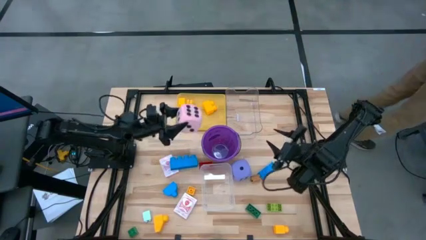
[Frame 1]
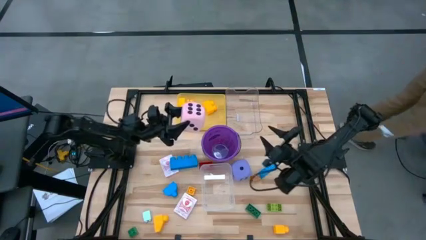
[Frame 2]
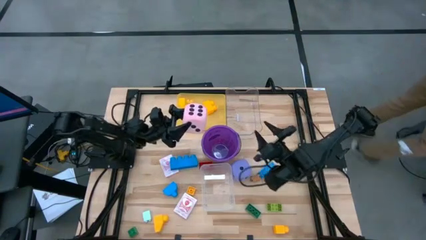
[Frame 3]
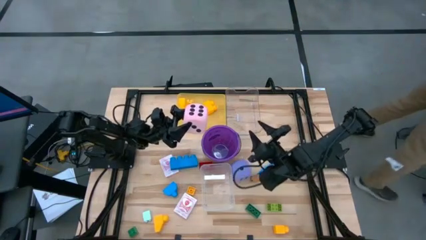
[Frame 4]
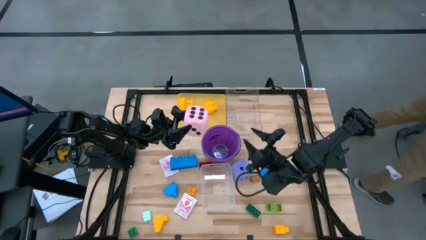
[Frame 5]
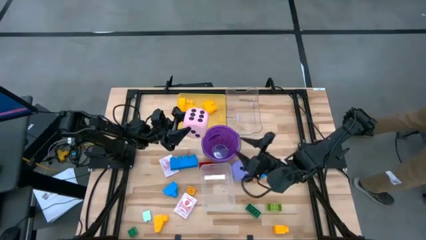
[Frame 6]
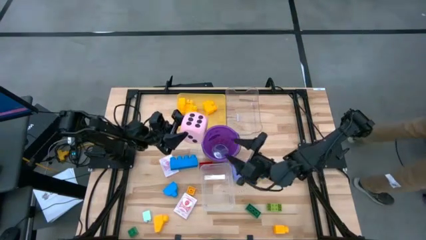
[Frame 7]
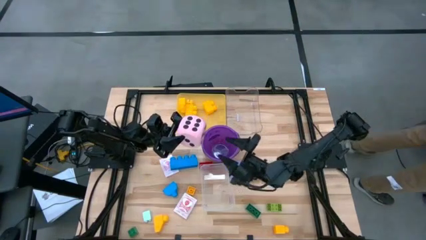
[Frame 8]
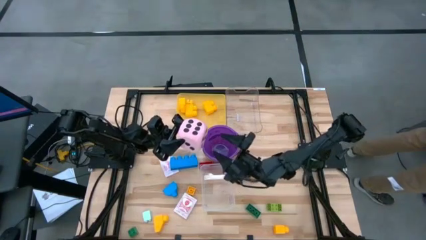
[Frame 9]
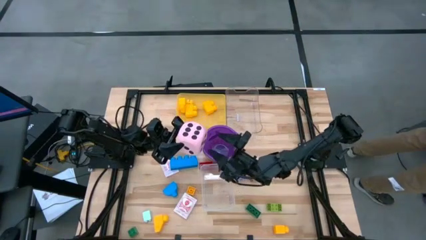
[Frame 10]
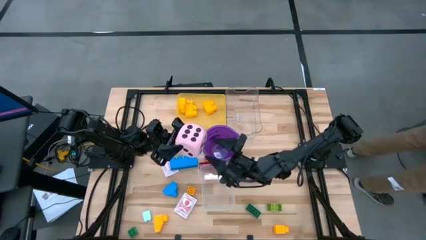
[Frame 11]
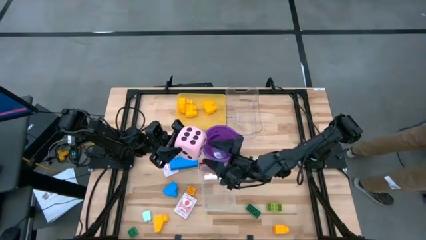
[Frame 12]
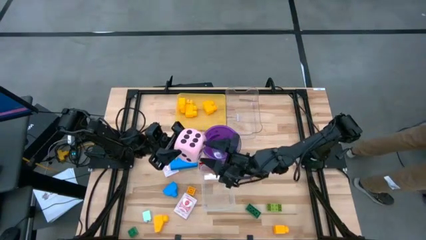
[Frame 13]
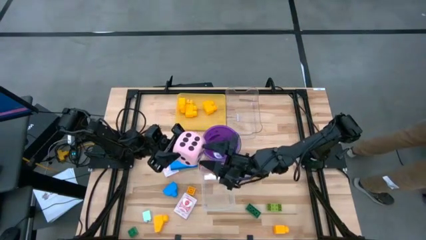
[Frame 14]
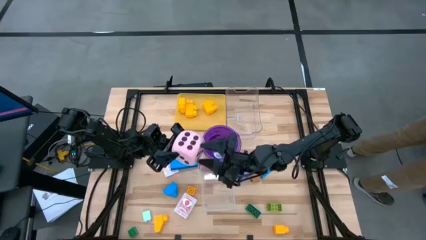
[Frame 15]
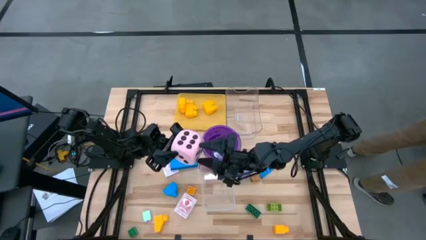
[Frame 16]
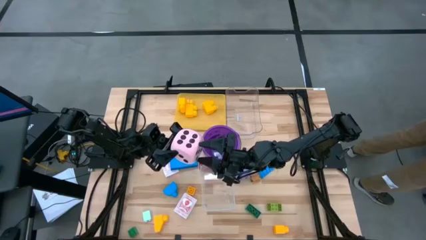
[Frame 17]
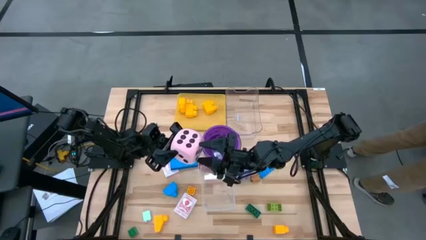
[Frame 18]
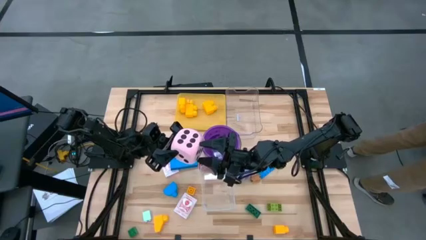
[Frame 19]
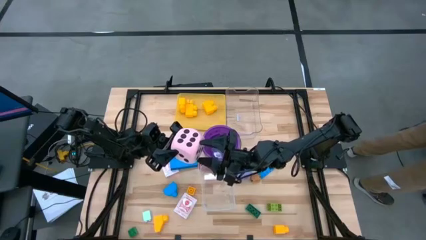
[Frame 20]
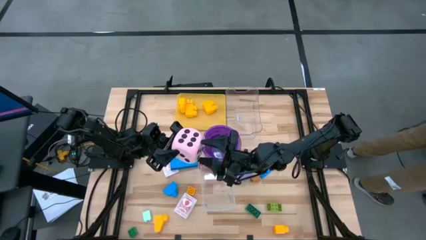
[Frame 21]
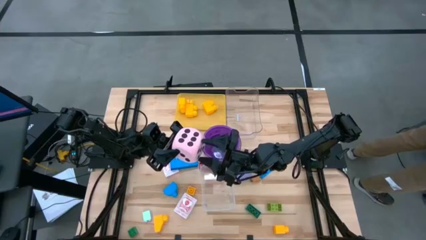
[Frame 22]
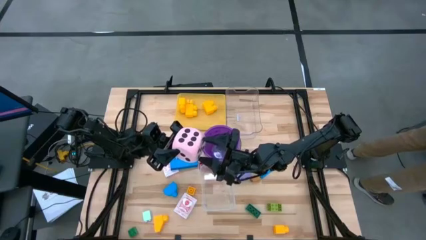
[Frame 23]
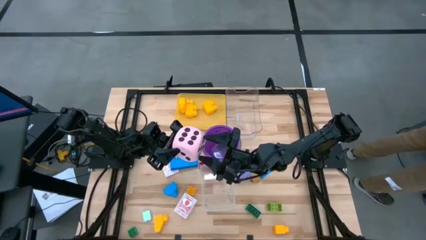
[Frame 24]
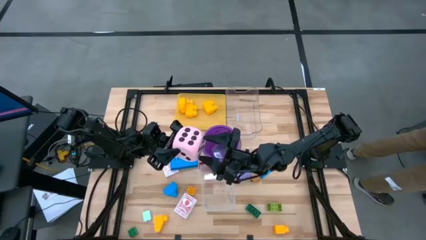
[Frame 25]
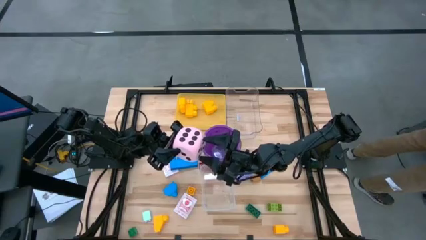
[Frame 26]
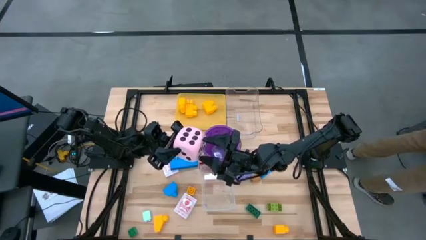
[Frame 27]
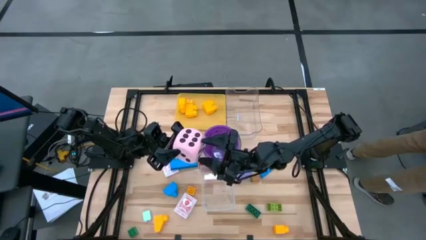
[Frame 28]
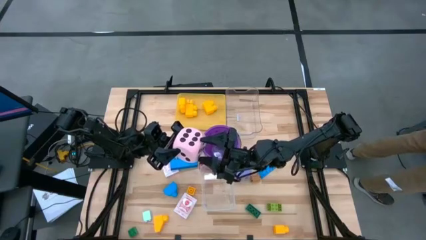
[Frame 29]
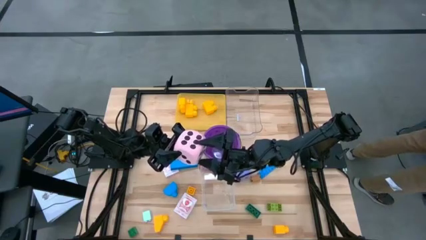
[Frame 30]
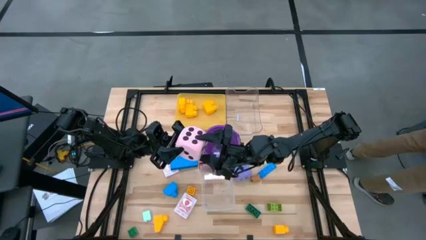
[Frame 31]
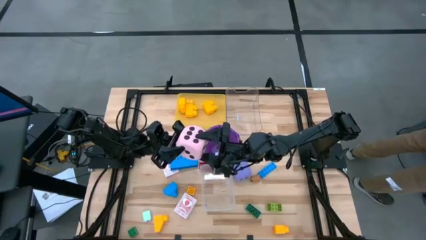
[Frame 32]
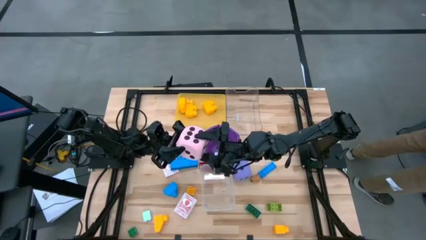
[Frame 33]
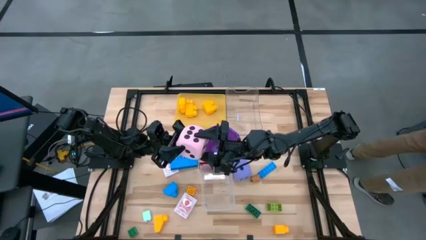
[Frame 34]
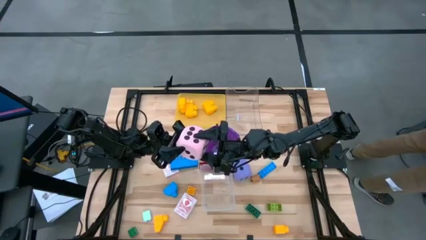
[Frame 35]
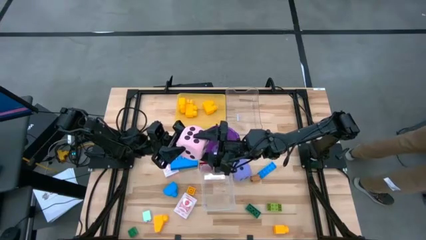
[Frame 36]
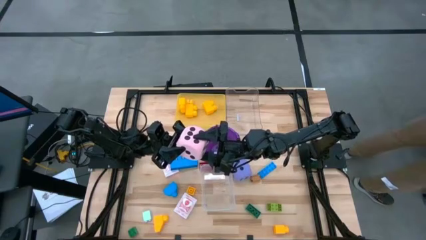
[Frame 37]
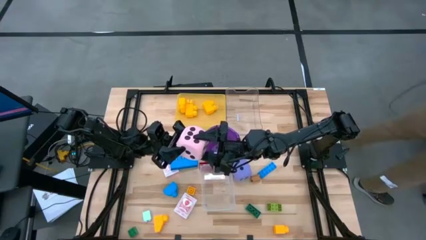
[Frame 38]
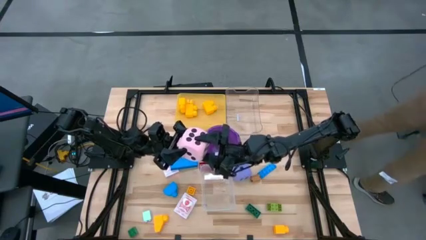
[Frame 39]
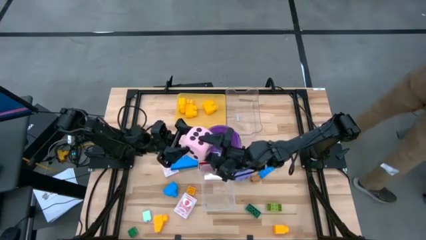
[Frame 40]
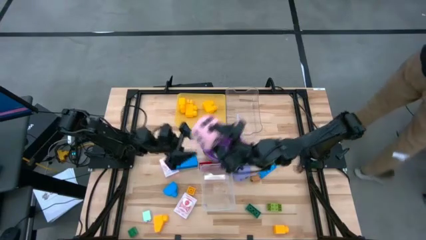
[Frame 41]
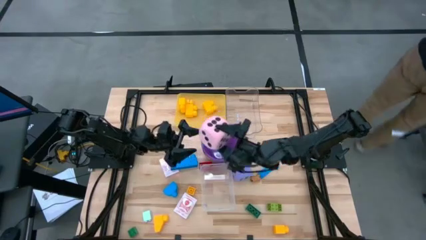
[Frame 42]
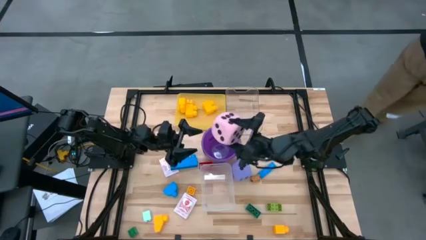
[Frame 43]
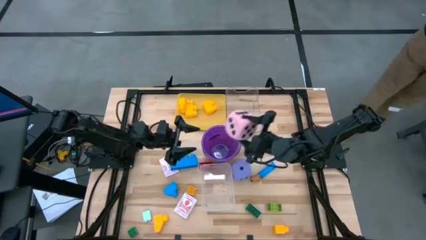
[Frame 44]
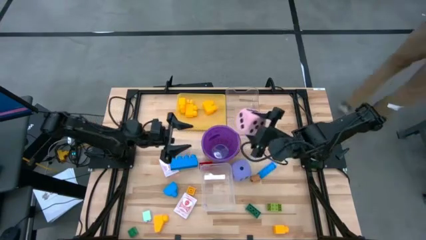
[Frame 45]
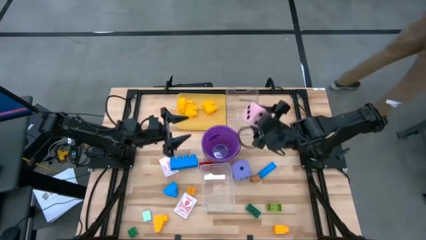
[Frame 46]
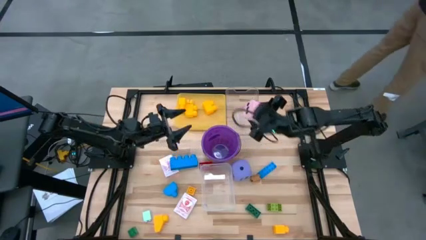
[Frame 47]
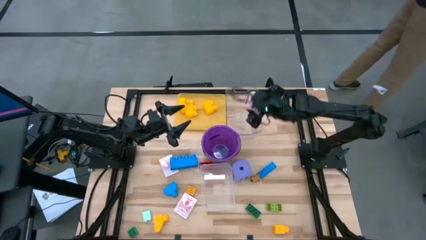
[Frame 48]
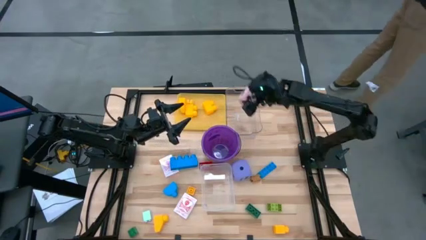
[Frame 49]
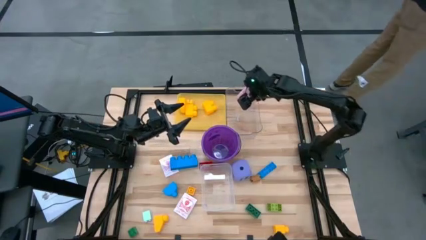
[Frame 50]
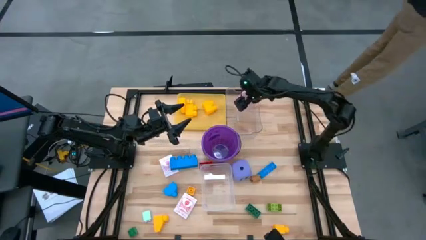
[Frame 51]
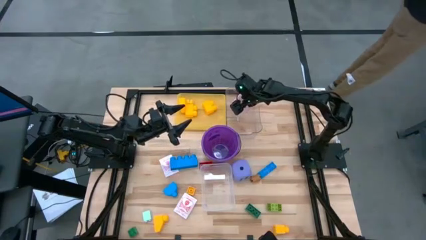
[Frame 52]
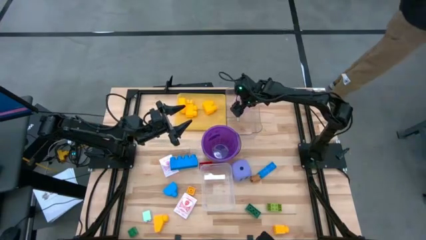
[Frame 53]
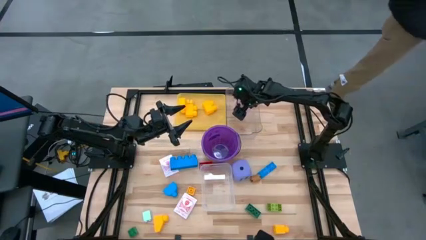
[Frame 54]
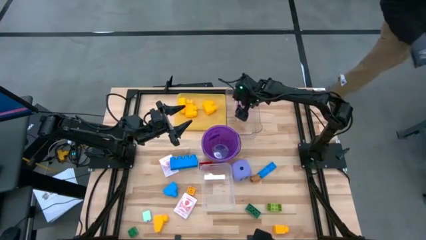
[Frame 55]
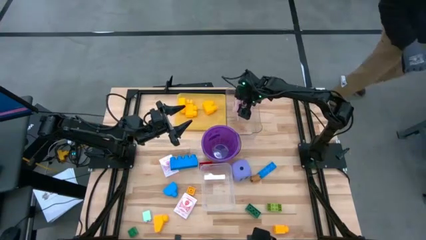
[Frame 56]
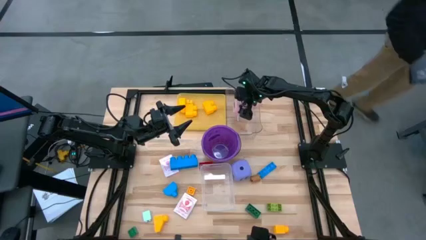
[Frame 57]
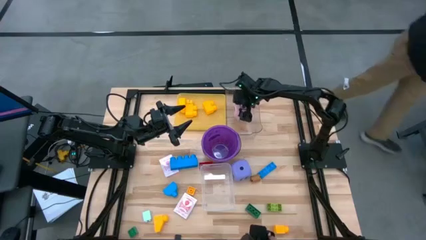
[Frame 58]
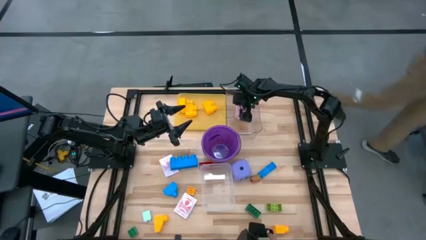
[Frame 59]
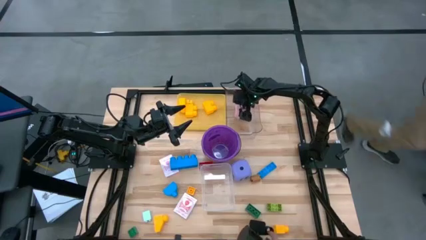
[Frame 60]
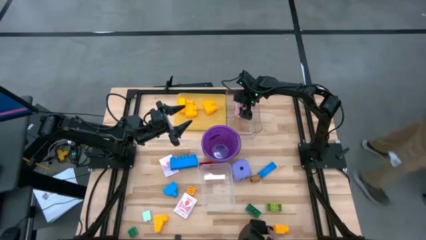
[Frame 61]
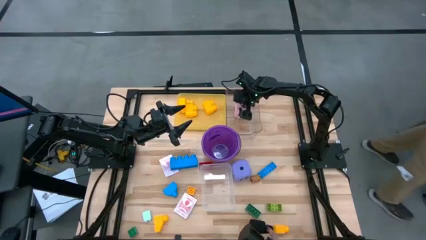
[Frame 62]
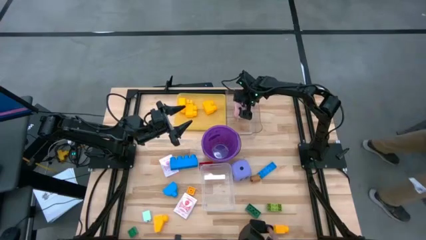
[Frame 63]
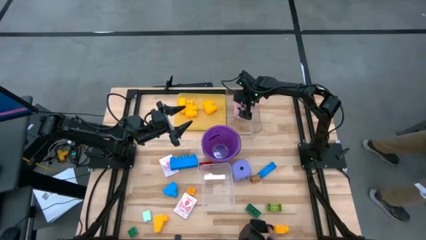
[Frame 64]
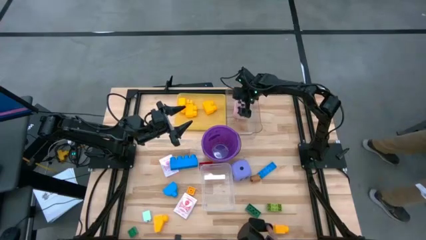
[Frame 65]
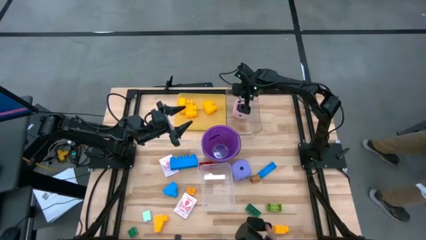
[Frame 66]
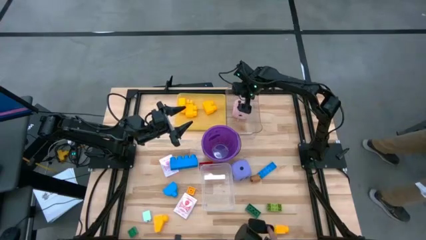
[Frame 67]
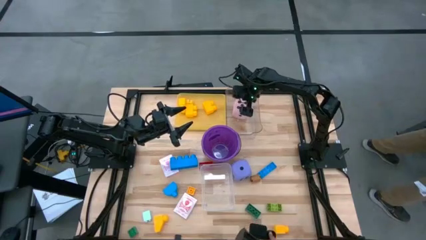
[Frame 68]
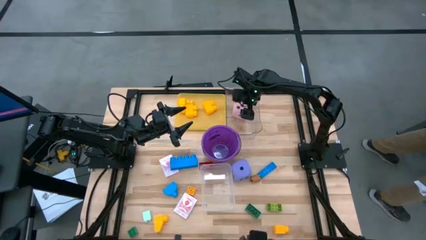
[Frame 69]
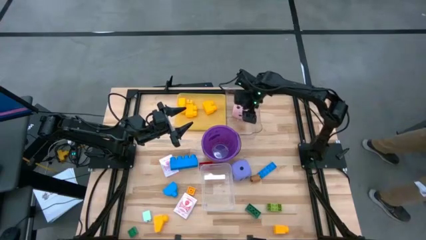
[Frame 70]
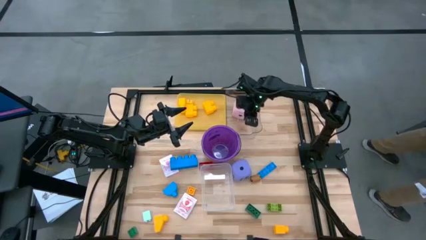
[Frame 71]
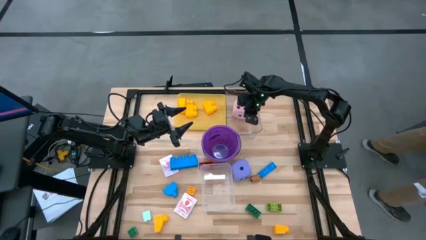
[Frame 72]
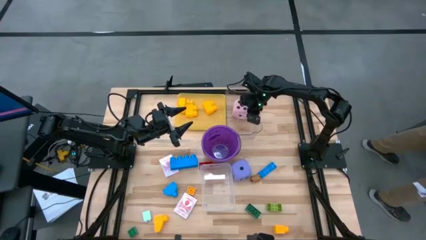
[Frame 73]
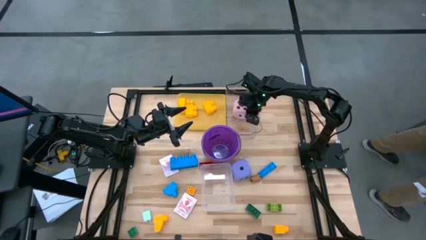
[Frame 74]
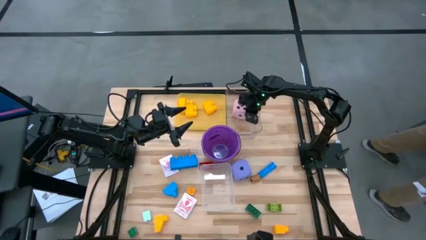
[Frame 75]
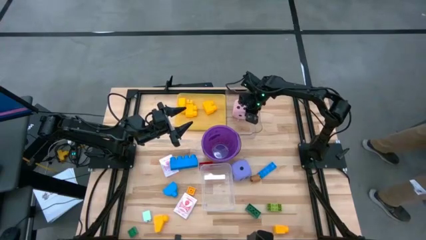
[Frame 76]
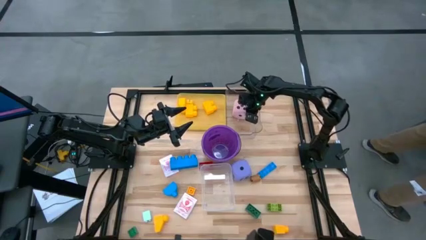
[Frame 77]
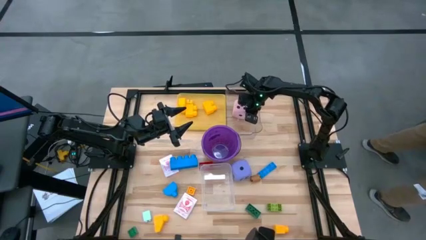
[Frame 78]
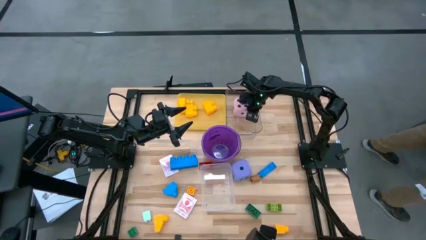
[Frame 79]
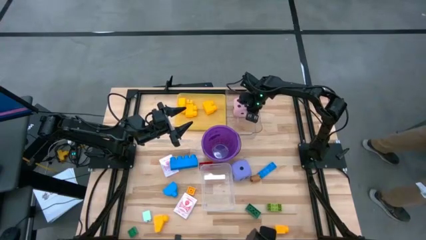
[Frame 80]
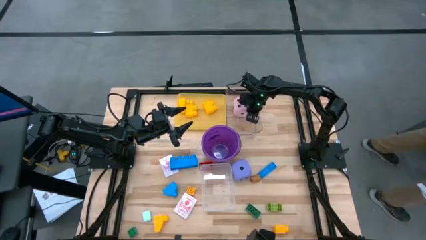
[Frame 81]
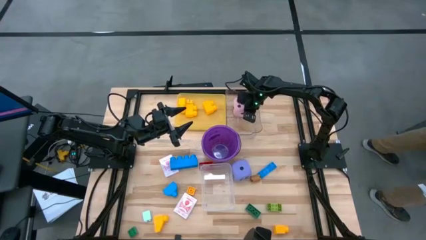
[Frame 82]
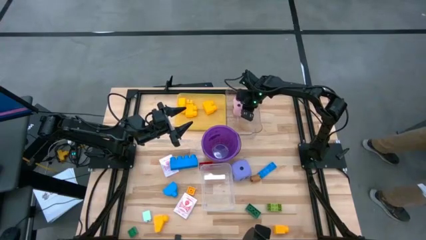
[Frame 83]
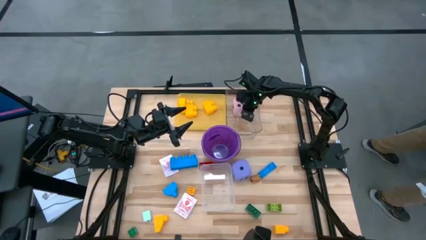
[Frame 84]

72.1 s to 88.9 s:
Task: Pick & Place Toys
Put the pink dice into the top transparent bin

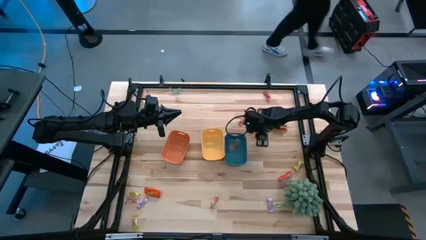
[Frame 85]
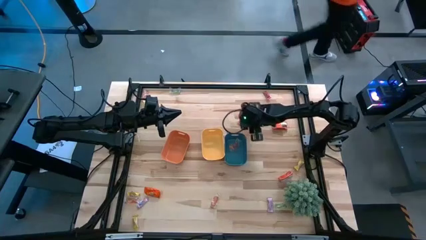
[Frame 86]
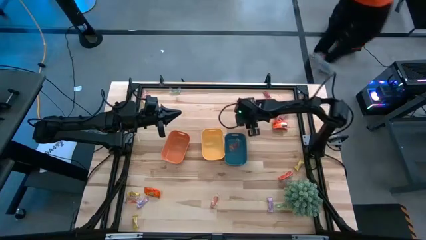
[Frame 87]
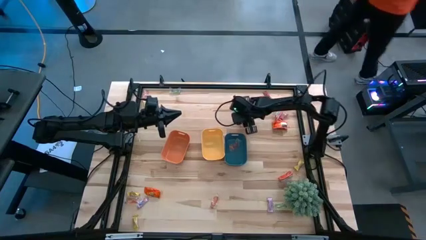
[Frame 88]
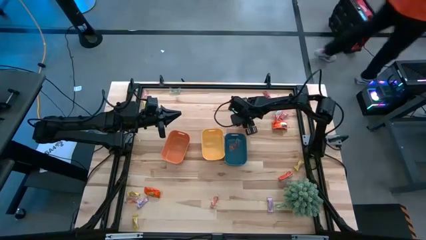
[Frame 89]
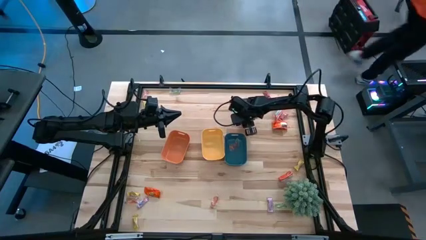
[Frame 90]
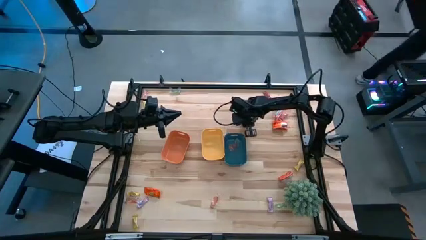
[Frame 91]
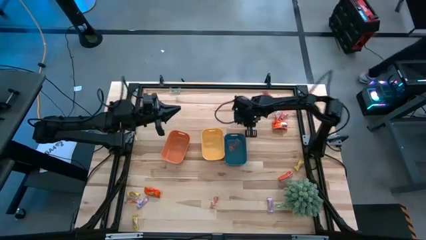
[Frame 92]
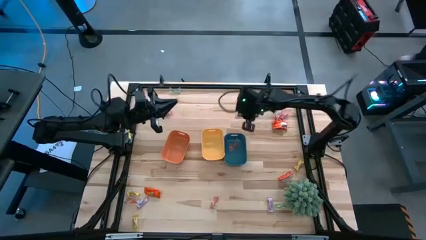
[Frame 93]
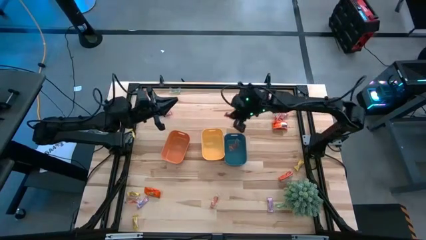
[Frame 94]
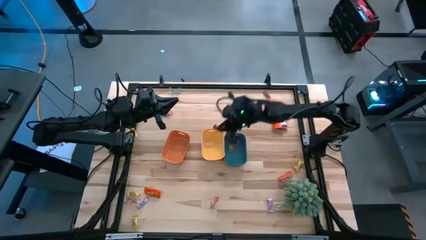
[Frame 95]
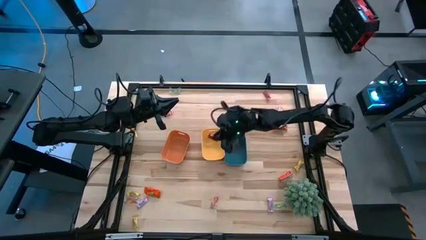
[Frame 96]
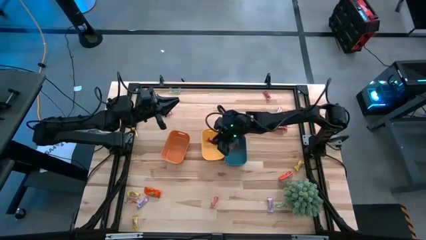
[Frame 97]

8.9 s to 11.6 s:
Task: Sort candy
Put the red candy into the yellow bin
